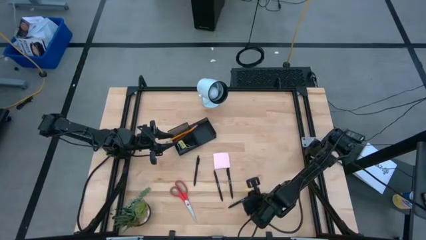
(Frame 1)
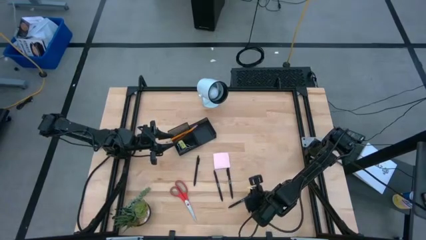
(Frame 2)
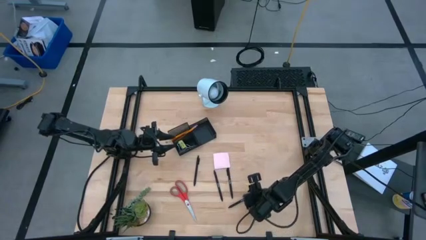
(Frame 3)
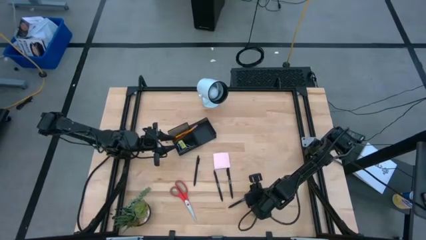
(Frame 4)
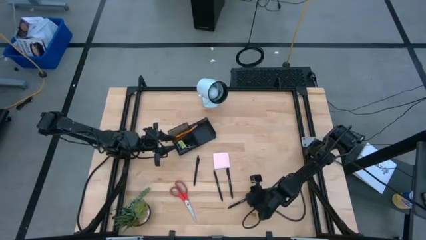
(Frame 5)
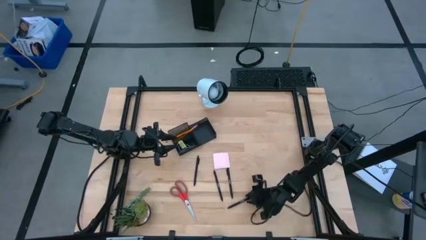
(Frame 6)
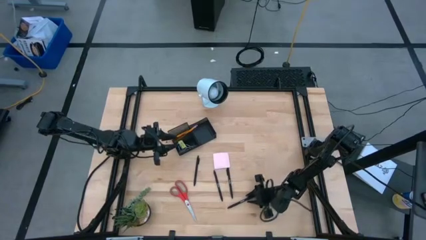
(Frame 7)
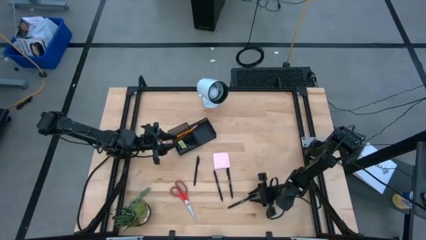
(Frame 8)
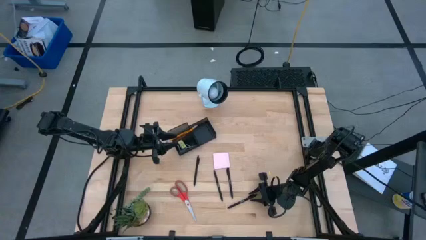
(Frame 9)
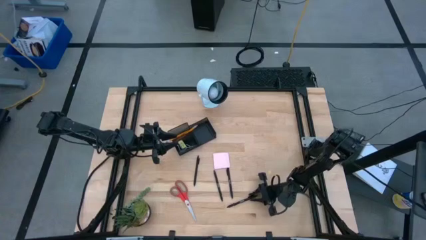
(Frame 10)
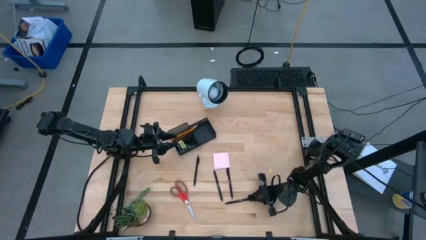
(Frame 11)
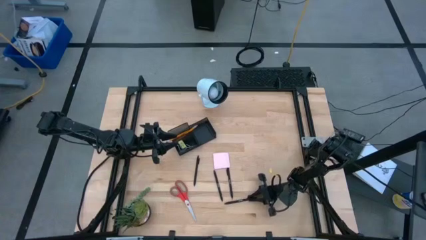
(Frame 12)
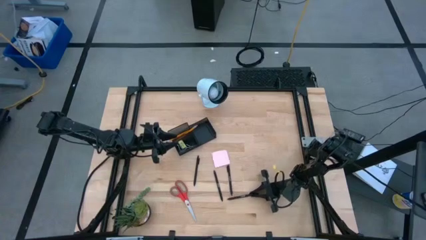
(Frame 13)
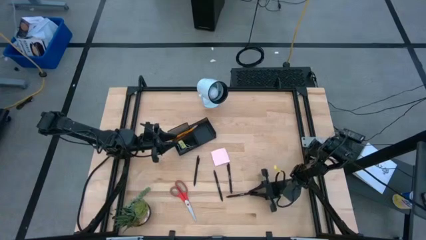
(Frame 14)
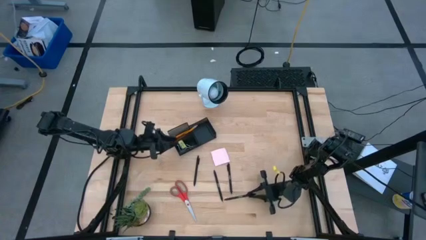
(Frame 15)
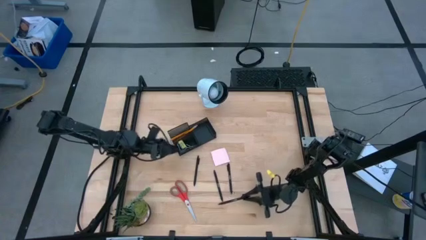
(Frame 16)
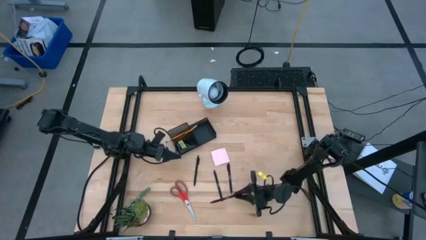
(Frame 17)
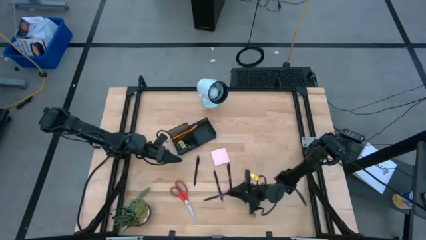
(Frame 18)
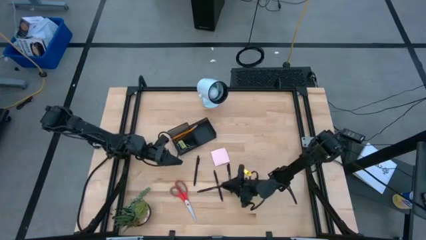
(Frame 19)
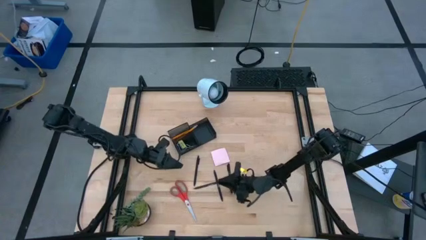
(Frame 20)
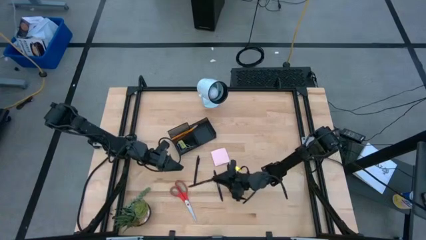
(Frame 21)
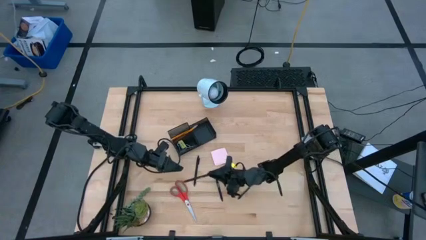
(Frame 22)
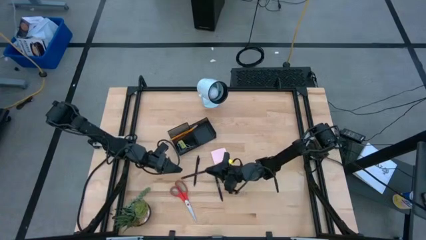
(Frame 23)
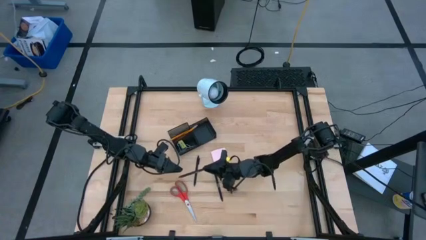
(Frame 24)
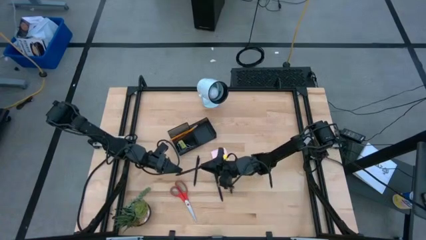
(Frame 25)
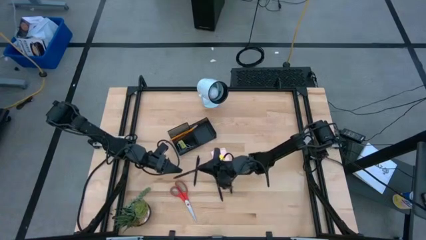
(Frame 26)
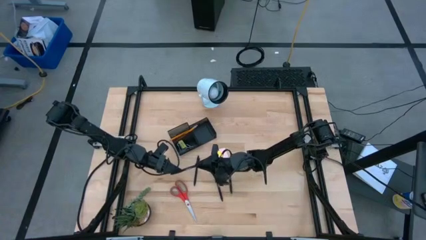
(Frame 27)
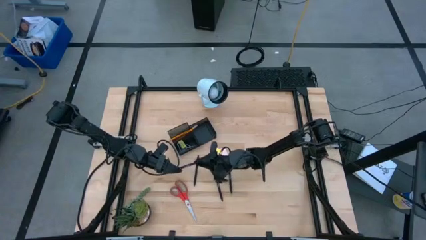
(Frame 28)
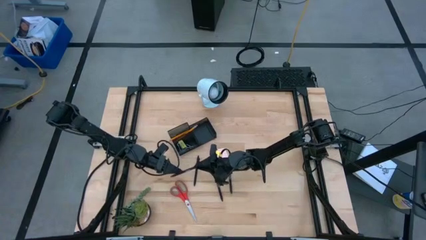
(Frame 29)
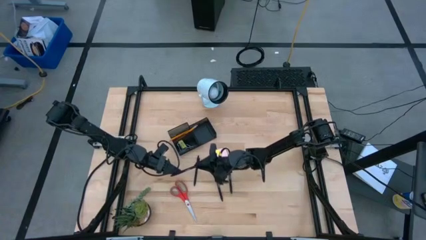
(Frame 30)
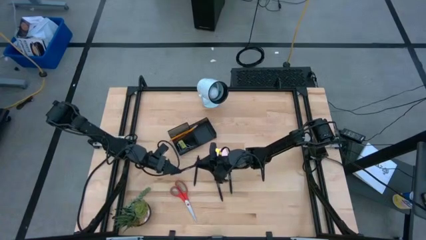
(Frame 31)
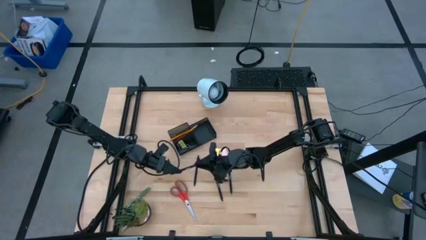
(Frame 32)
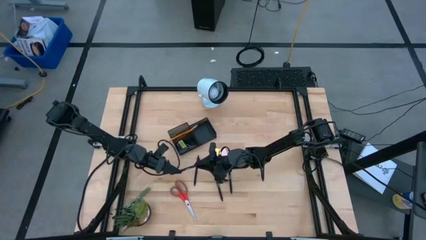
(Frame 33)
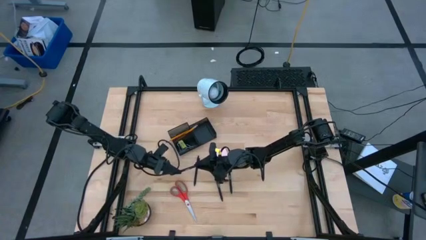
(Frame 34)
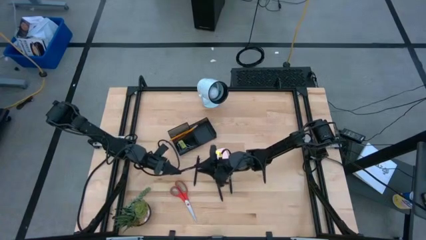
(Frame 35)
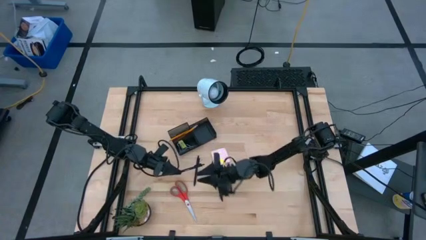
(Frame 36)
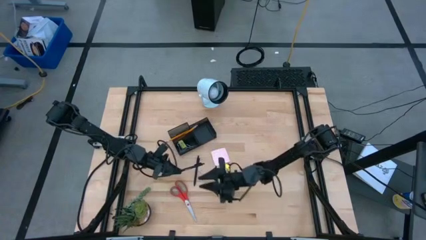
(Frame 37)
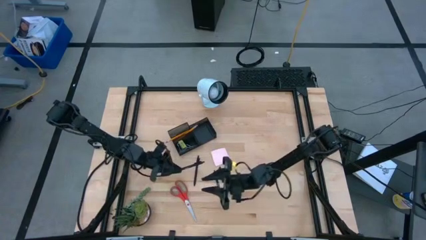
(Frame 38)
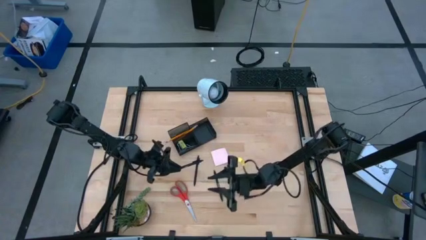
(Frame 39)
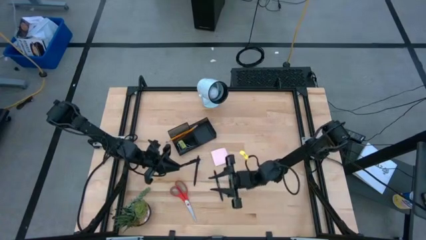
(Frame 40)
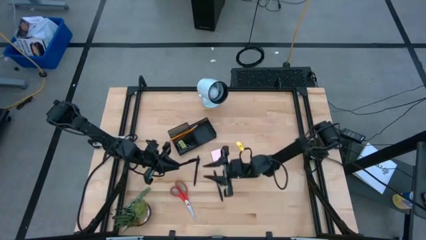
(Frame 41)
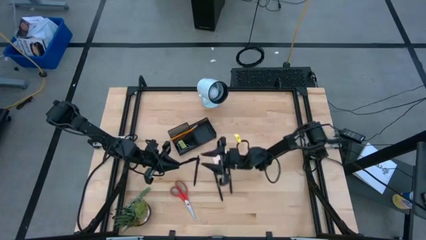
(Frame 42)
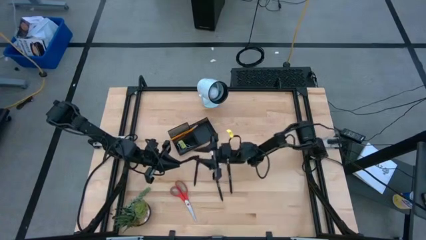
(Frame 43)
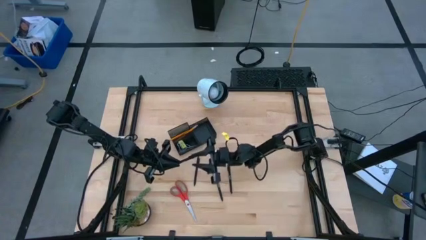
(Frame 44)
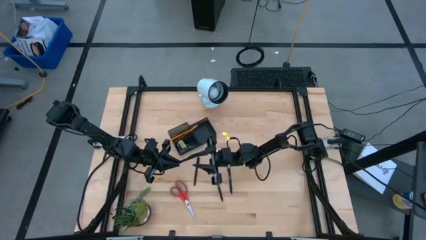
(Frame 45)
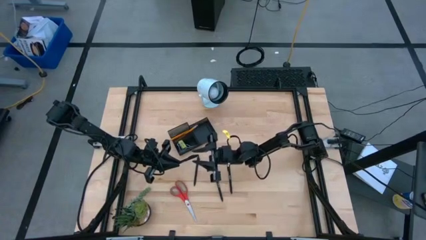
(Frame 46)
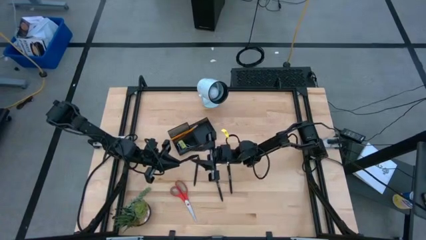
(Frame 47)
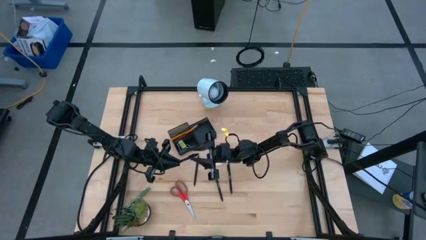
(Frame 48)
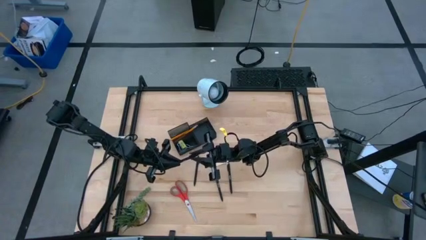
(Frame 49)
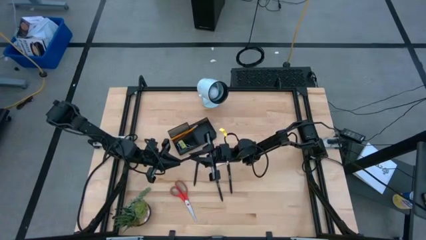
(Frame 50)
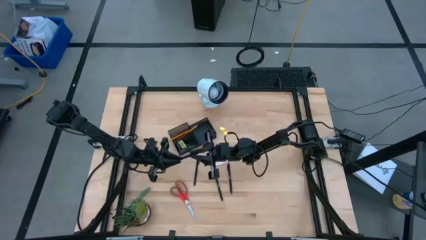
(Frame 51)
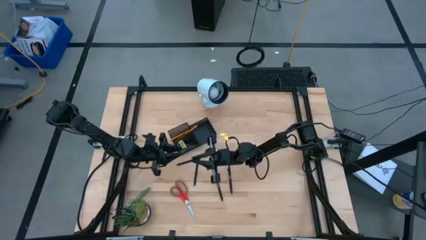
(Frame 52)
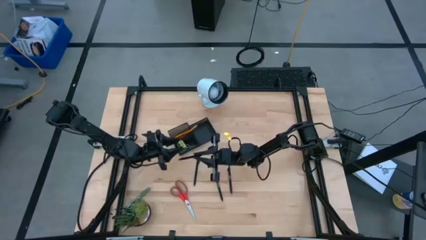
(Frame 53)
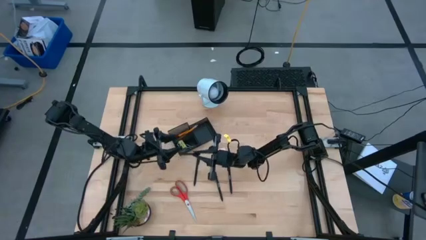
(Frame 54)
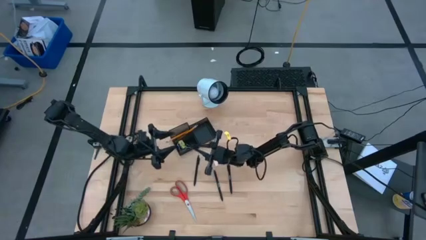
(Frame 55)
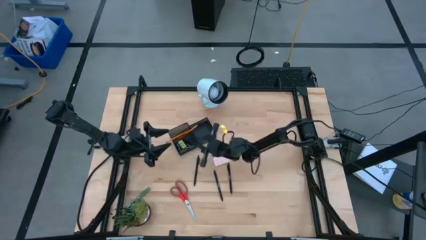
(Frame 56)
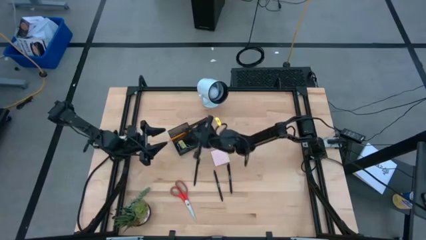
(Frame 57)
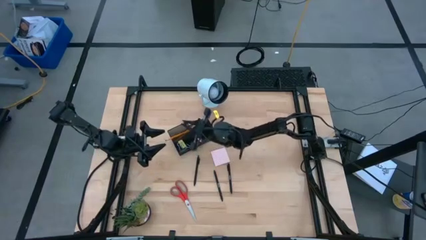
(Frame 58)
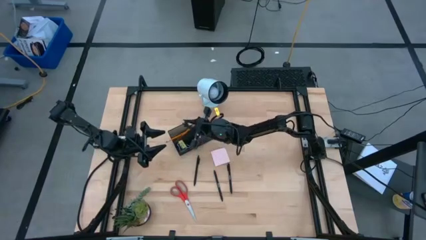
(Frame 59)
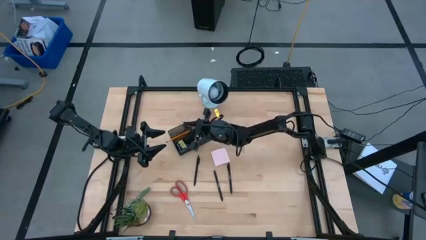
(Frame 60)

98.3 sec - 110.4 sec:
Task: Pick and place office supplies into organizer
Put the black pen into the black desk organizer

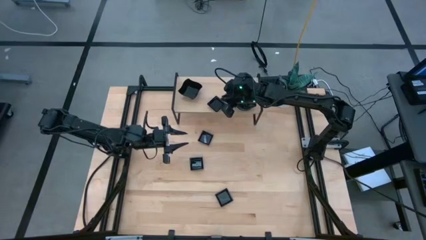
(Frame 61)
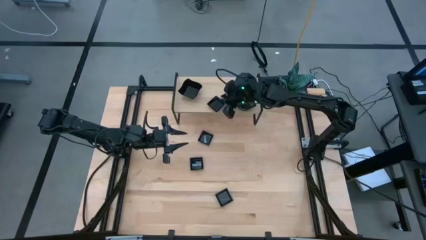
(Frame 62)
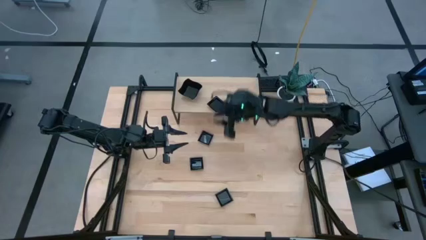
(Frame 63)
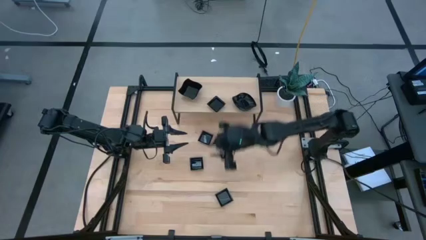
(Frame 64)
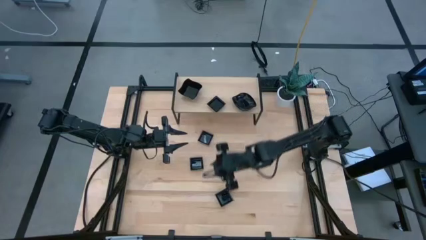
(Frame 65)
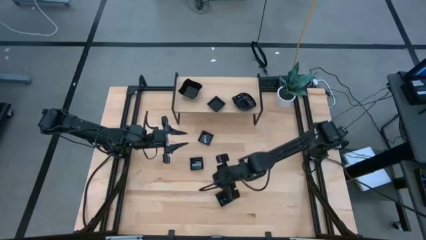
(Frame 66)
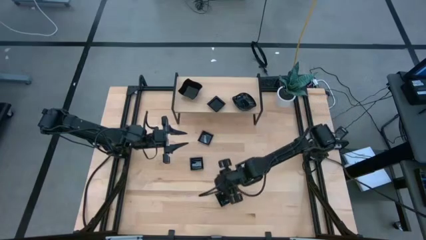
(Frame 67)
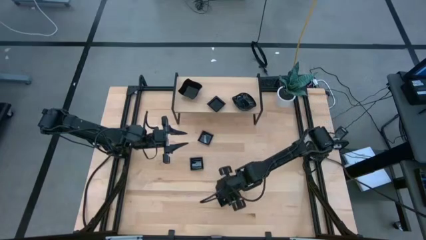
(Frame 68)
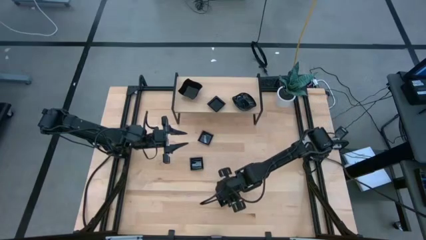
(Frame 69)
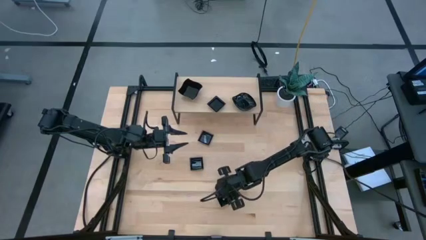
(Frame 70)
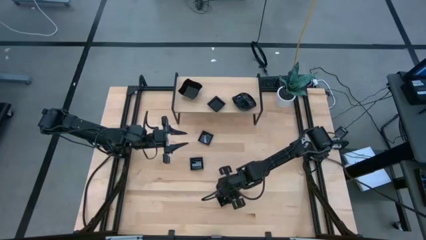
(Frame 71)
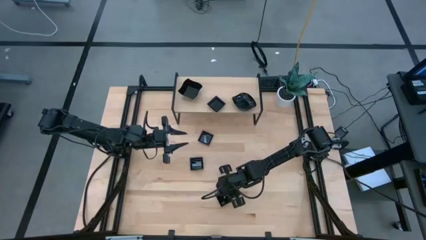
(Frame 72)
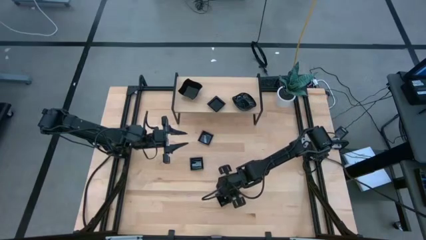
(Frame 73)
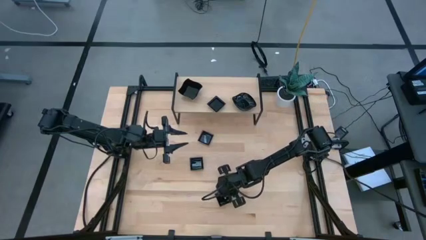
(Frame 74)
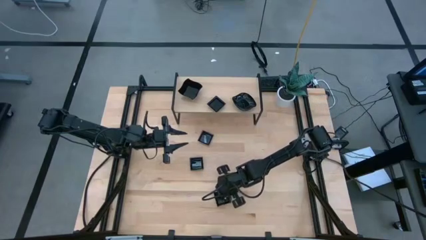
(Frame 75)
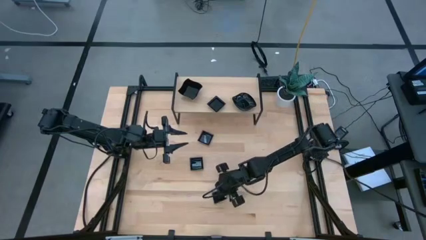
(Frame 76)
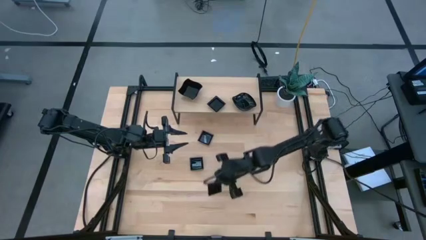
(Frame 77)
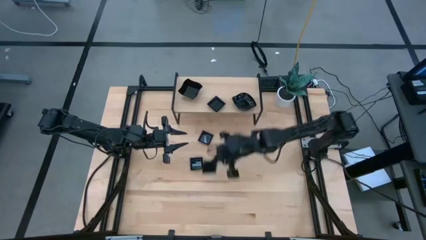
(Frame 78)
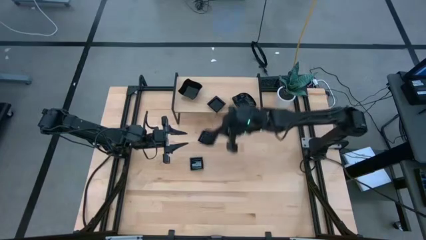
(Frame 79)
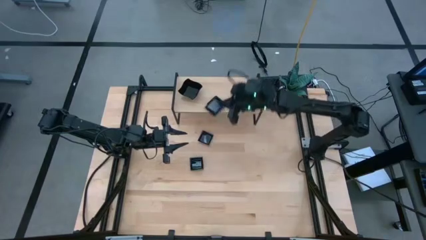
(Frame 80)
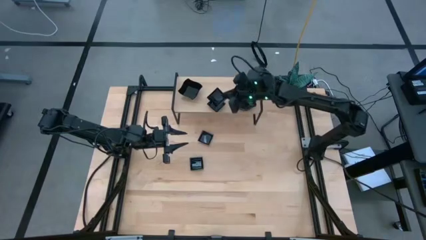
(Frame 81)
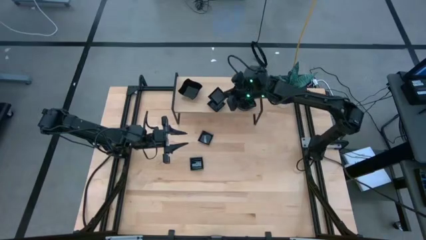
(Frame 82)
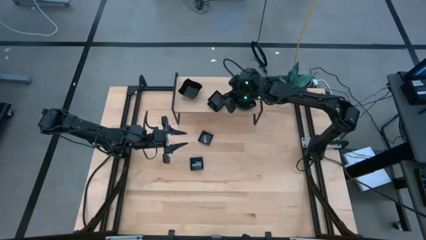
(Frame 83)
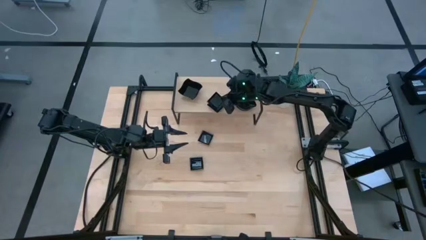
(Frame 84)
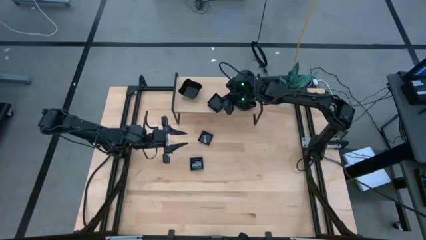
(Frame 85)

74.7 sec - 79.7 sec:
Task: Pick & Place Mini shaped plates
Stack the bottom square plate on top of the other square plates on the shelf
